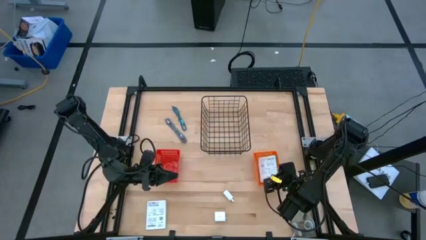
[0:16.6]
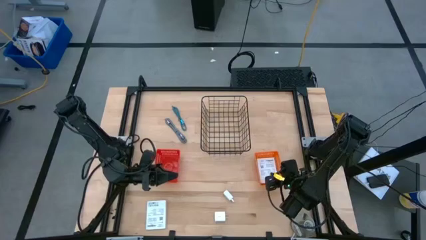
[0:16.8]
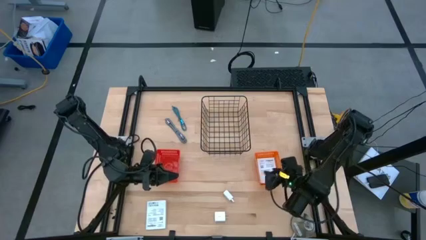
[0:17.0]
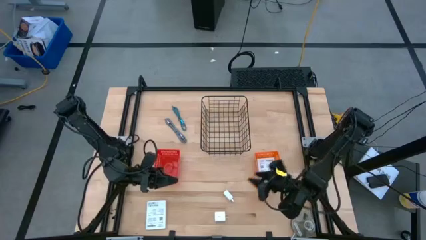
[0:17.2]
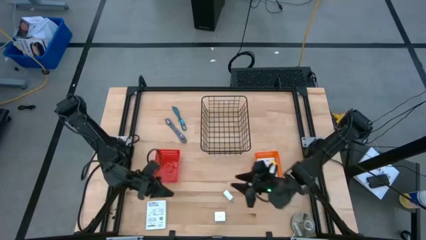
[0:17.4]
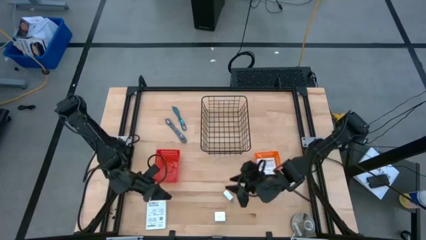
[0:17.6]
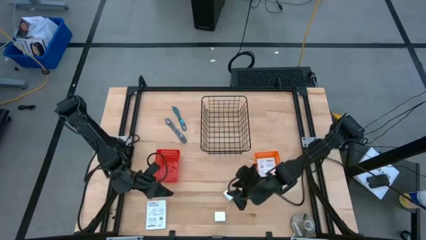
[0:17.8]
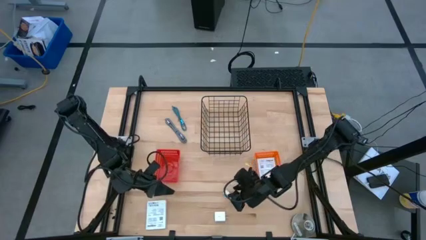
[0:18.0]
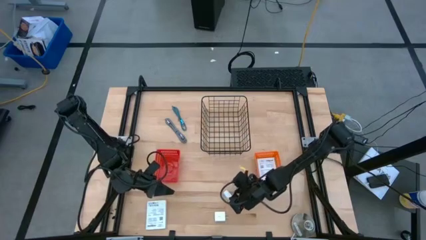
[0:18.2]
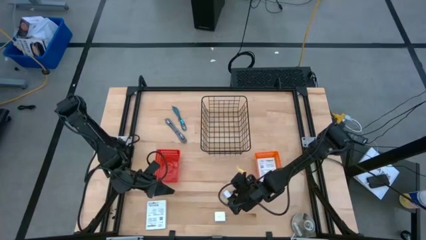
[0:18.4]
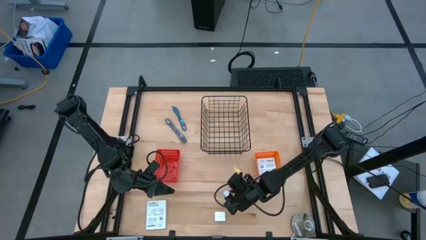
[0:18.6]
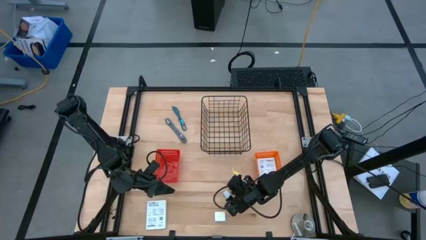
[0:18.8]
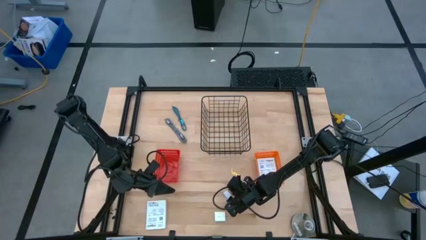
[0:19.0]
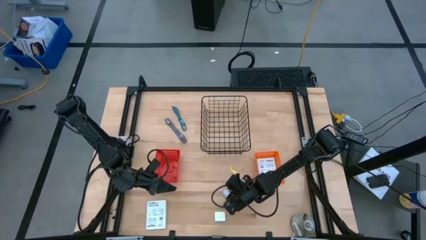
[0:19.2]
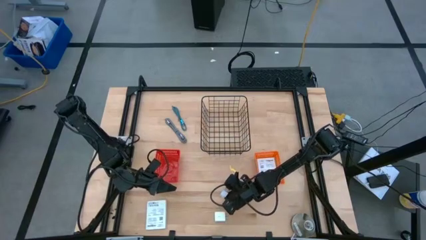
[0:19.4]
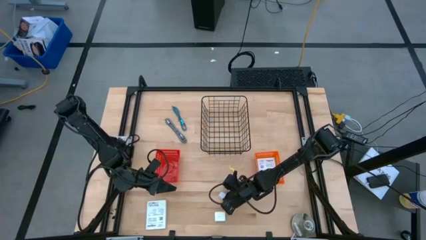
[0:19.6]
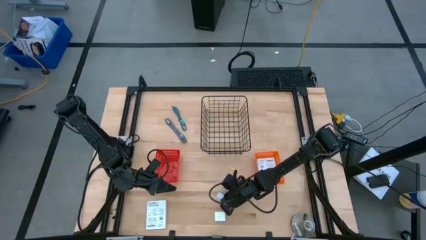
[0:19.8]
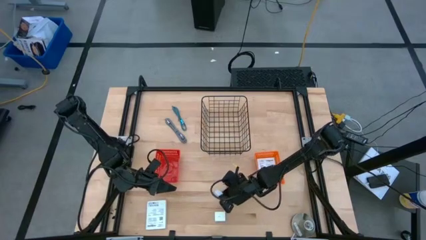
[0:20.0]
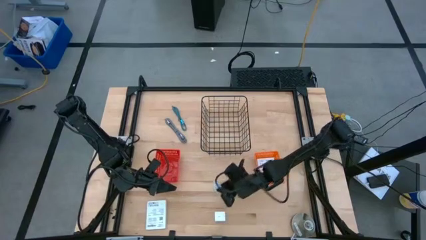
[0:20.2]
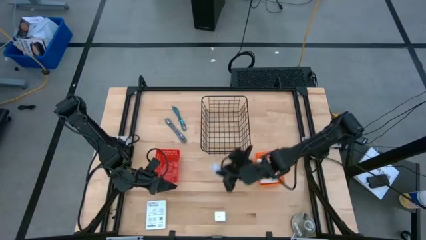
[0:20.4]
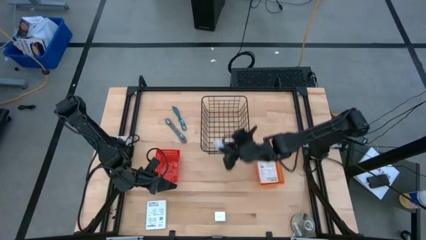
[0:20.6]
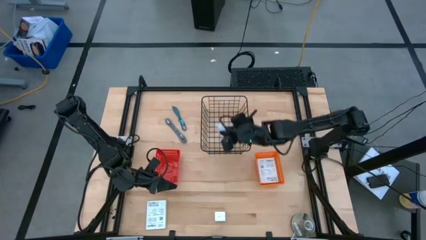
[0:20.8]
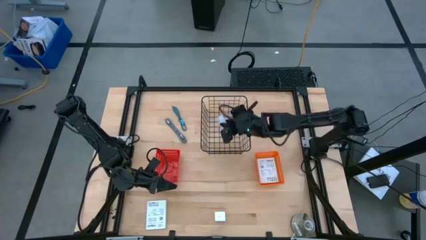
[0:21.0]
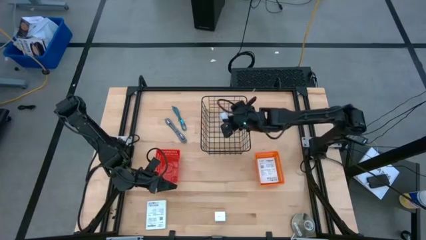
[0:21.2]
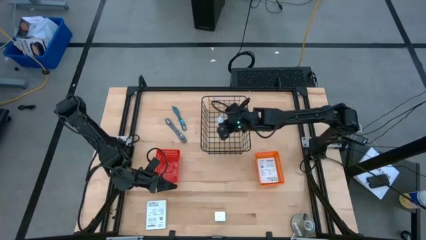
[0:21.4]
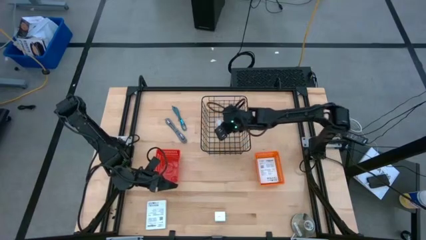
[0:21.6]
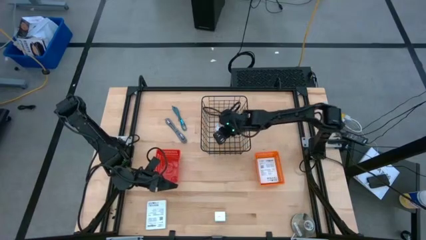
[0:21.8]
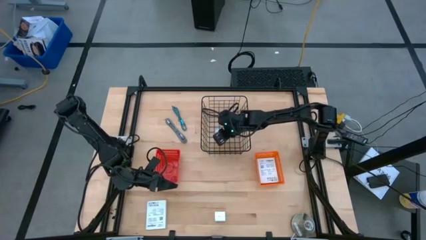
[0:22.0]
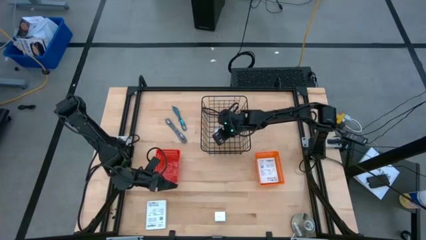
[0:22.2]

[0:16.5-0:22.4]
Task: Pick and place items into bin
Put the top white charger adapter into the wire basket

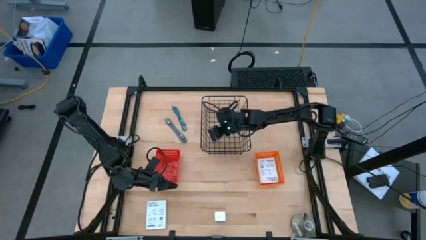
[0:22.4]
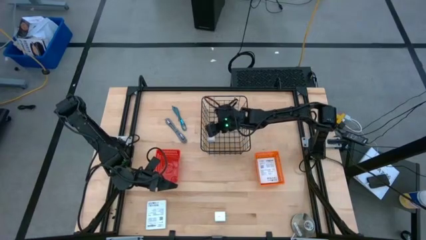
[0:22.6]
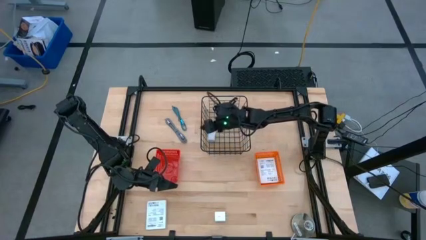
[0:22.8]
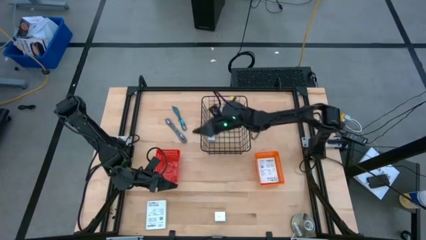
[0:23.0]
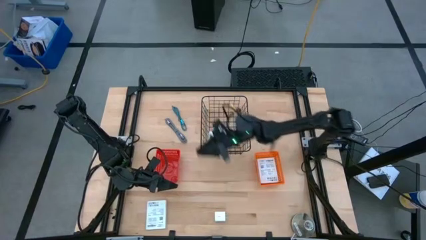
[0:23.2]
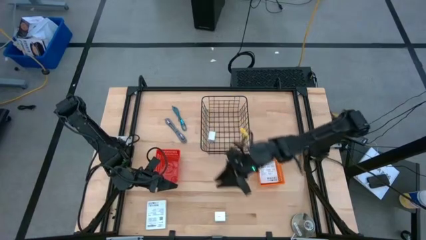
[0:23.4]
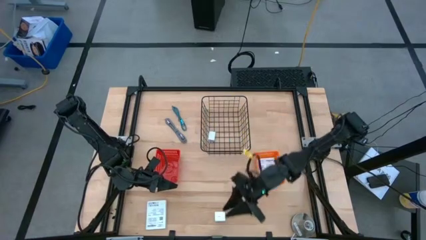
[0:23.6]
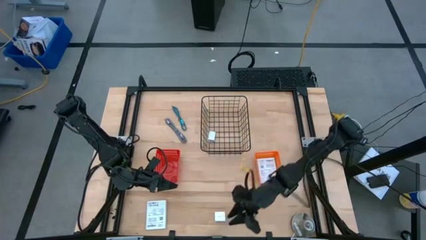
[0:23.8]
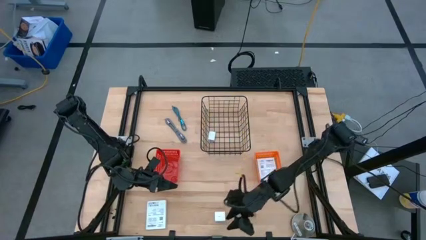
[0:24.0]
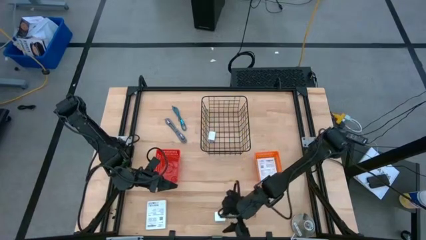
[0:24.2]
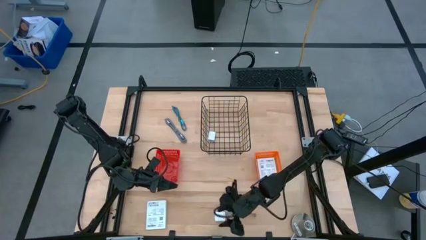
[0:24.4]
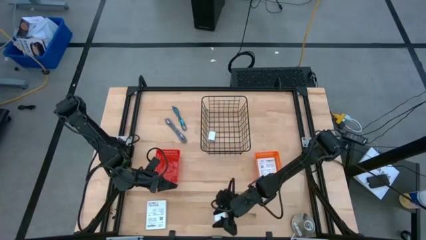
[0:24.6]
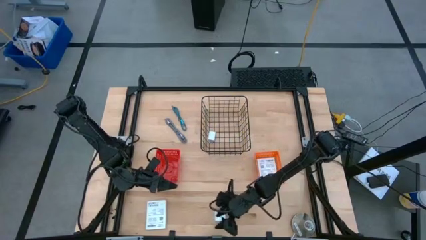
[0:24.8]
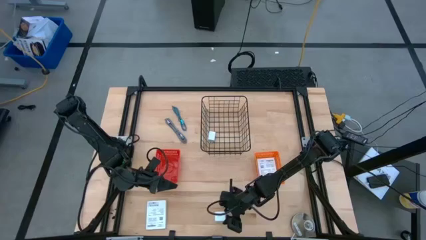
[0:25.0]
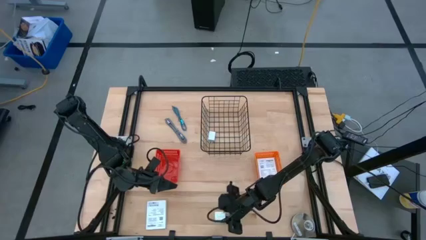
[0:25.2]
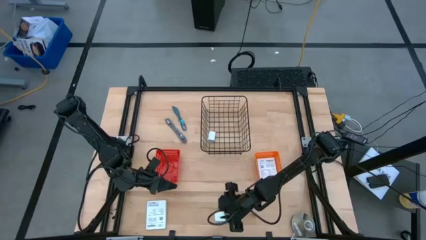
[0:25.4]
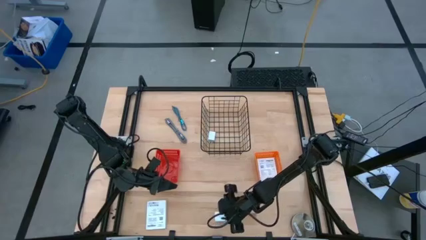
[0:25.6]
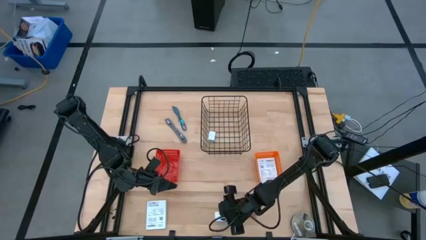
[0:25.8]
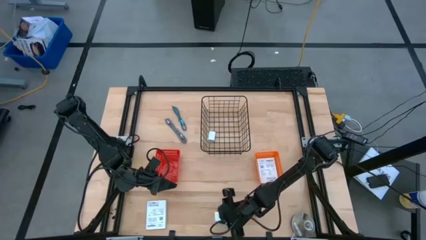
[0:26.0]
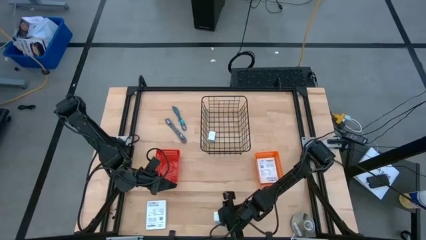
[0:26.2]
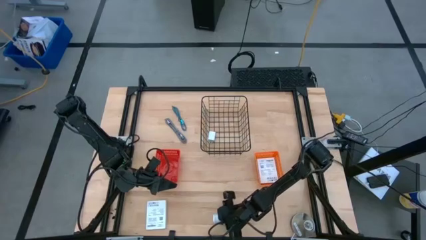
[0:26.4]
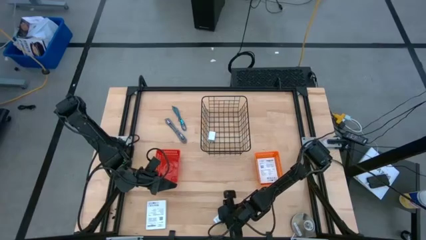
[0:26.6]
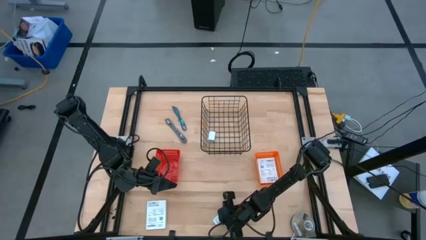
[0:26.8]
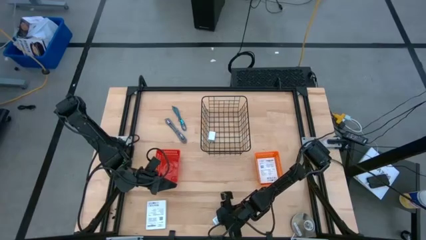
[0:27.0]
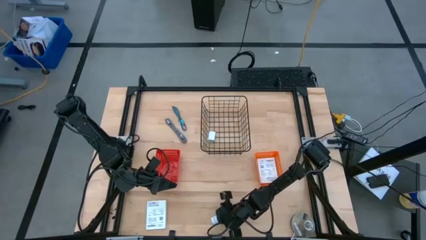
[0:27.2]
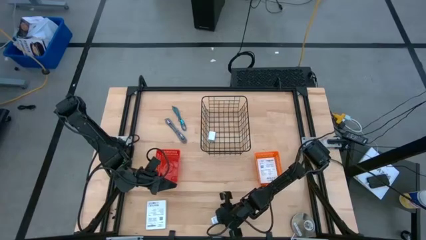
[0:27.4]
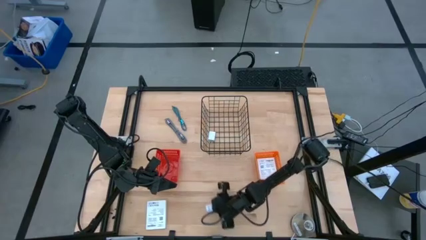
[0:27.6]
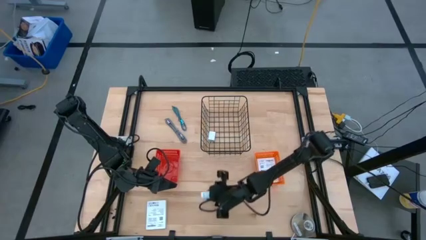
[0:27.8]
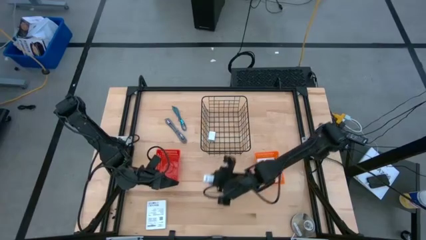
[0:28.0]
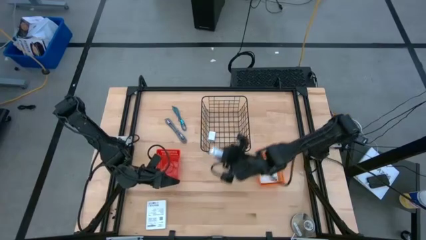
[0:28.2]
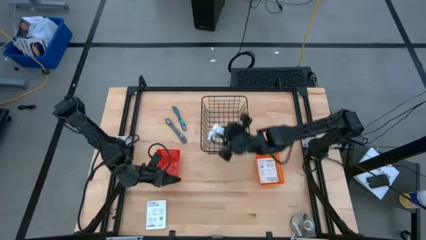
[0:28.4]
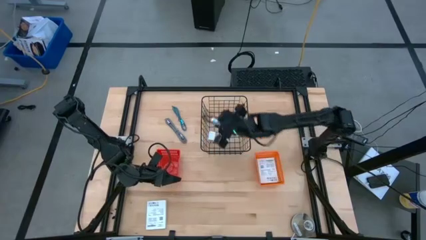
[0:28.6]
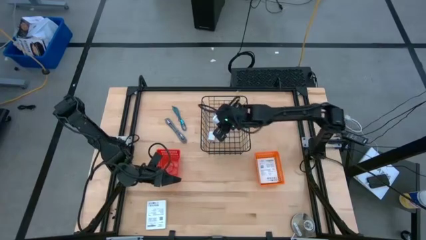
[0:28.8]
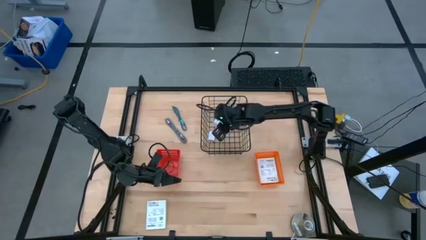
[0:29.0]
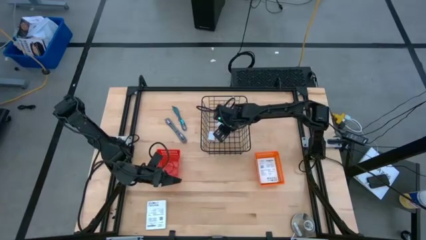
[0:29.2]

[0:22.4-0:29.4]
Put the white charger adapter into the wire basket
